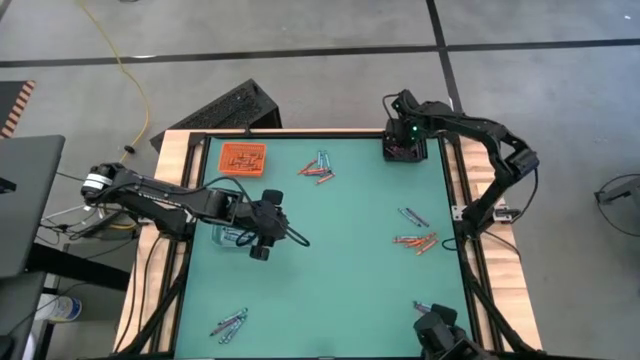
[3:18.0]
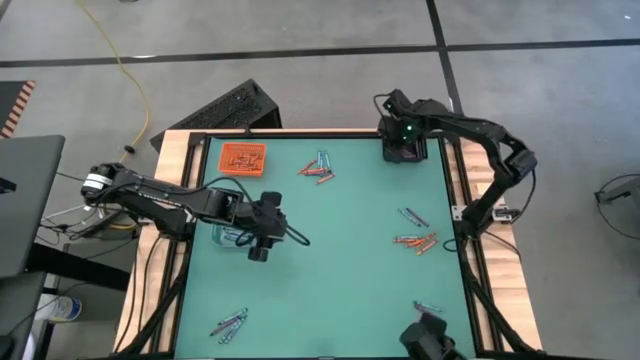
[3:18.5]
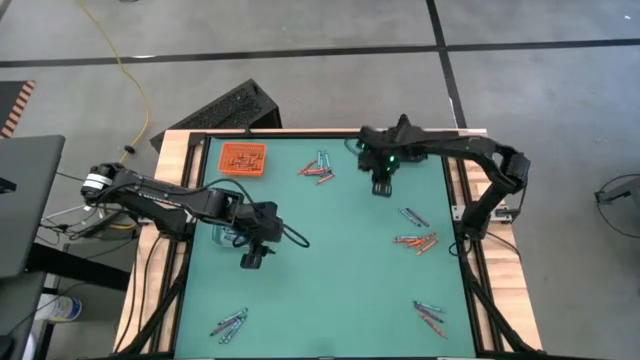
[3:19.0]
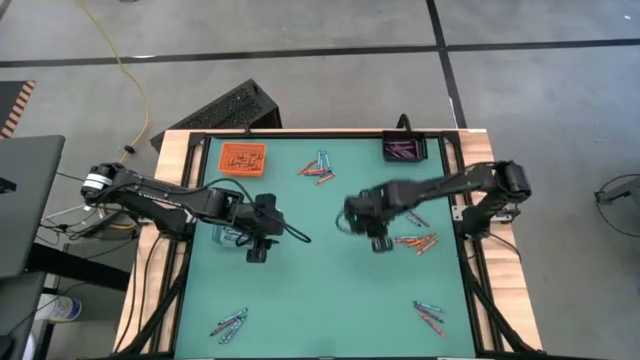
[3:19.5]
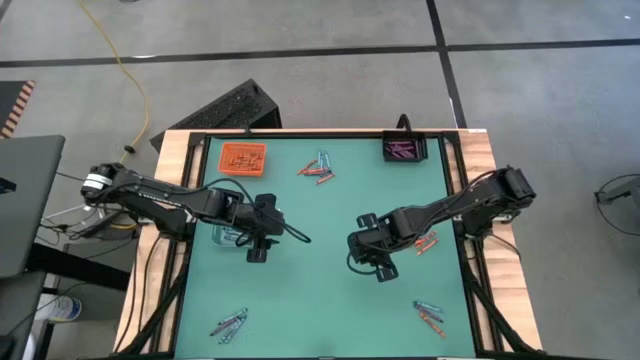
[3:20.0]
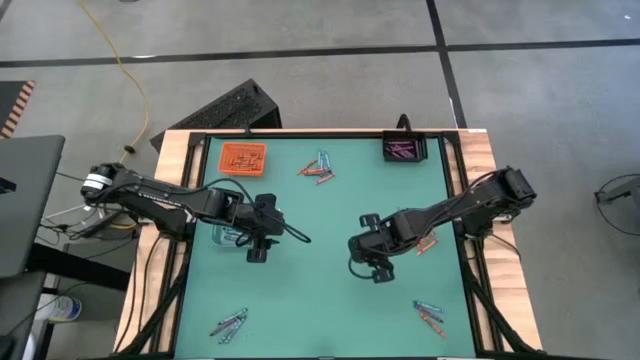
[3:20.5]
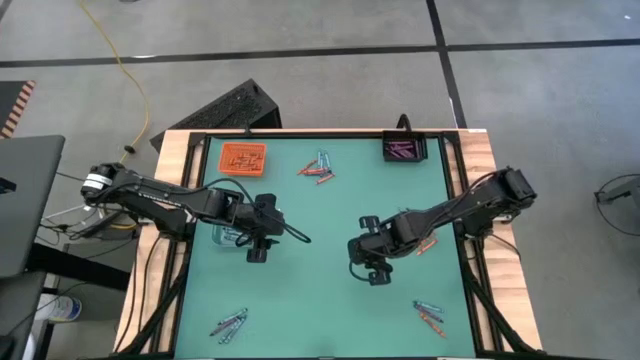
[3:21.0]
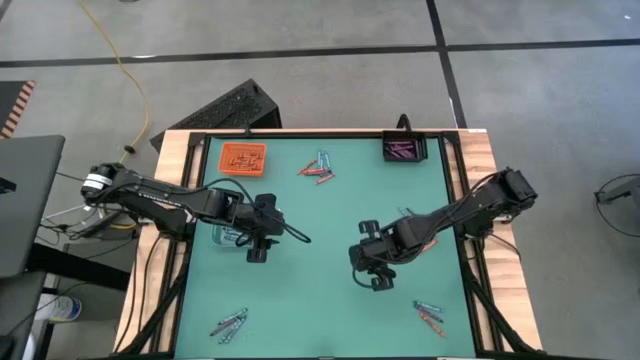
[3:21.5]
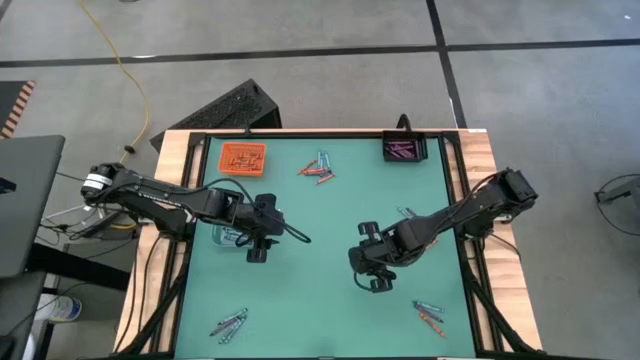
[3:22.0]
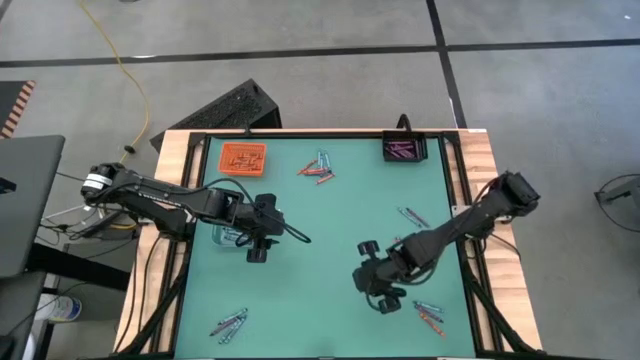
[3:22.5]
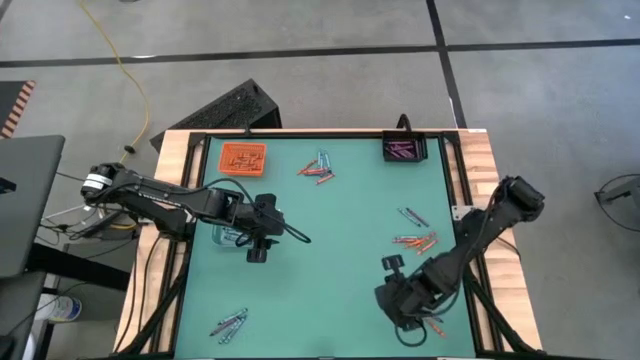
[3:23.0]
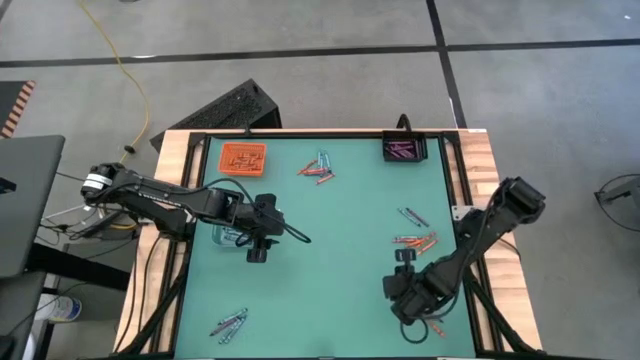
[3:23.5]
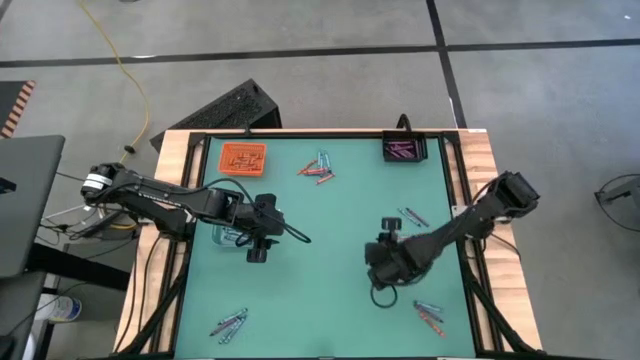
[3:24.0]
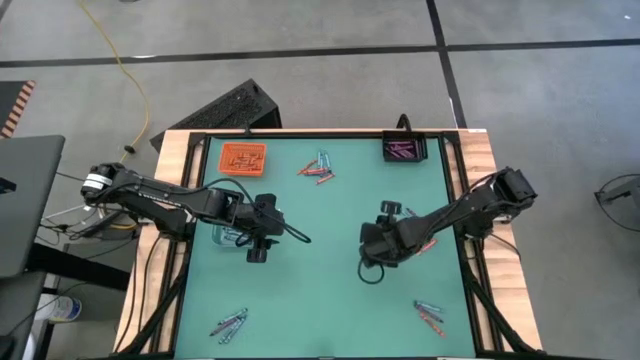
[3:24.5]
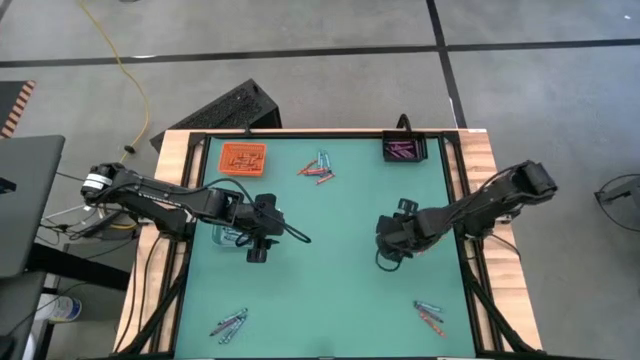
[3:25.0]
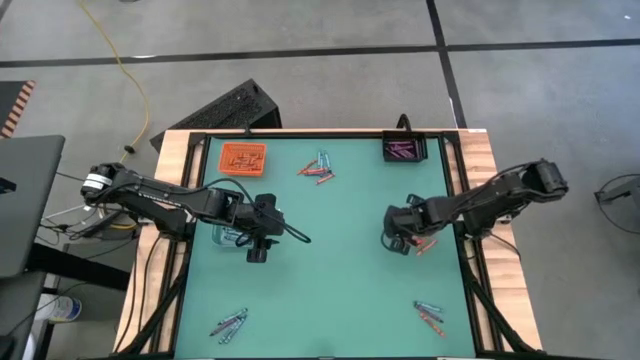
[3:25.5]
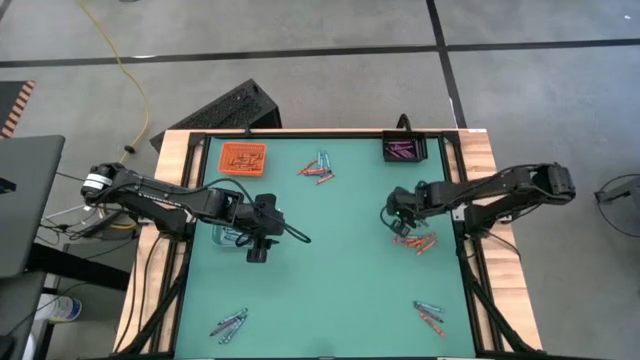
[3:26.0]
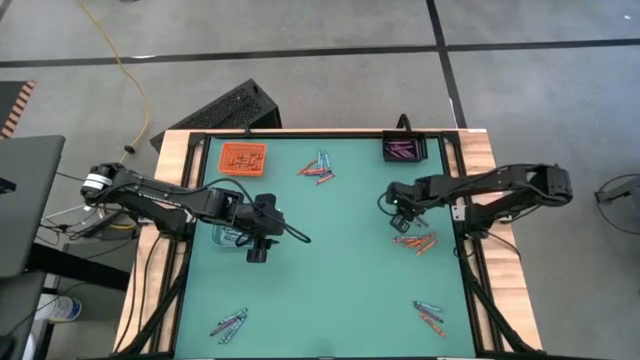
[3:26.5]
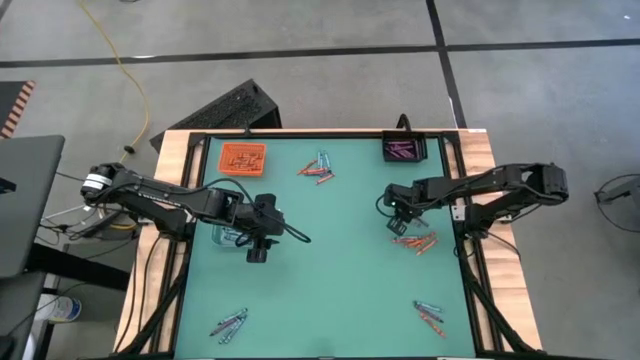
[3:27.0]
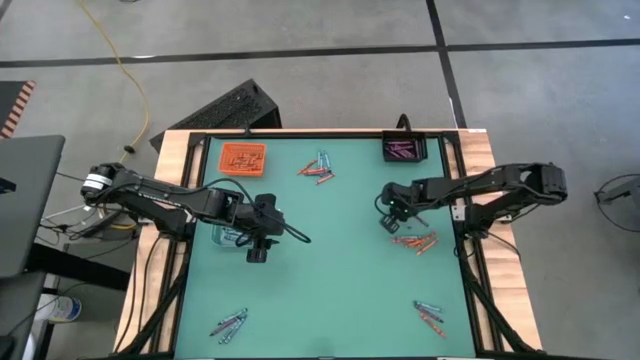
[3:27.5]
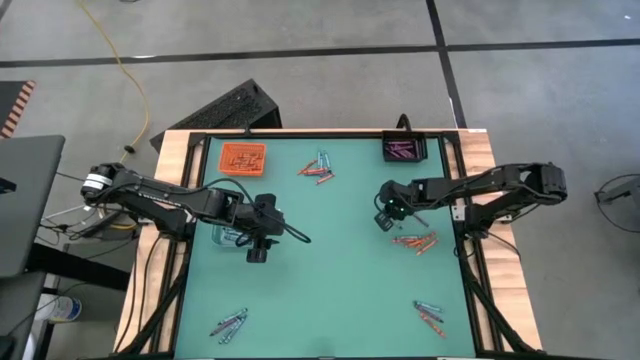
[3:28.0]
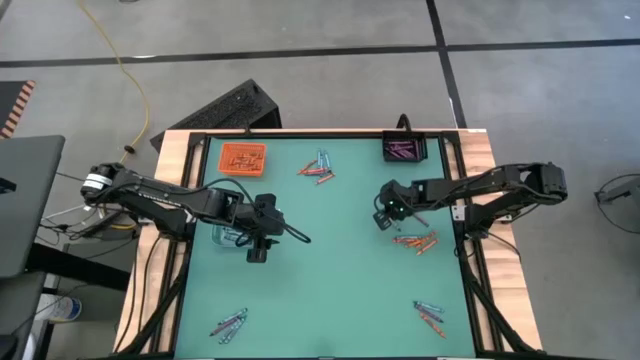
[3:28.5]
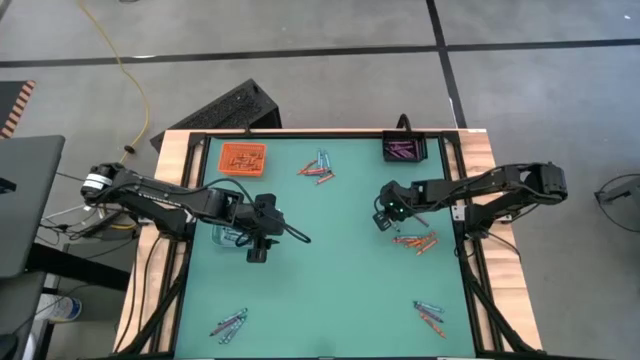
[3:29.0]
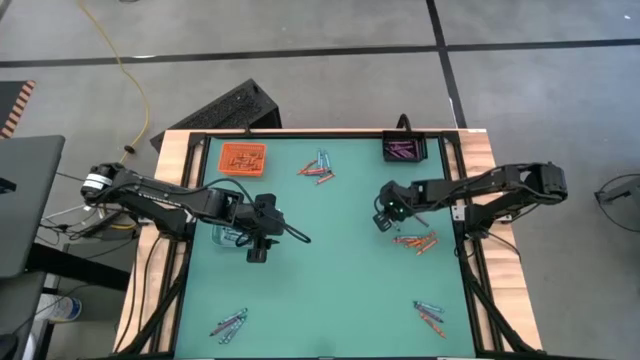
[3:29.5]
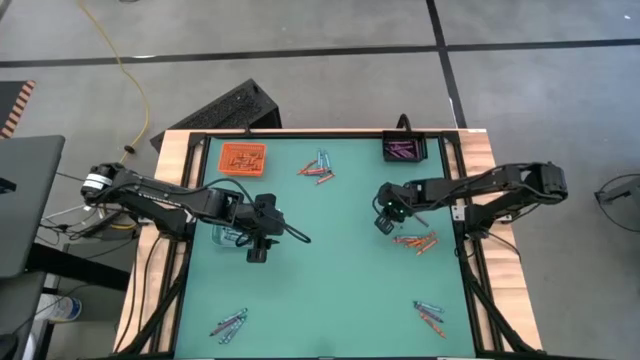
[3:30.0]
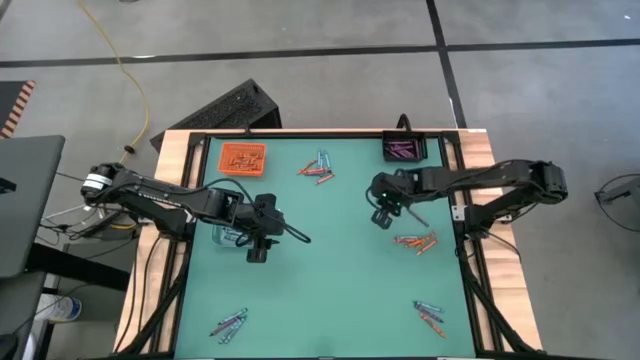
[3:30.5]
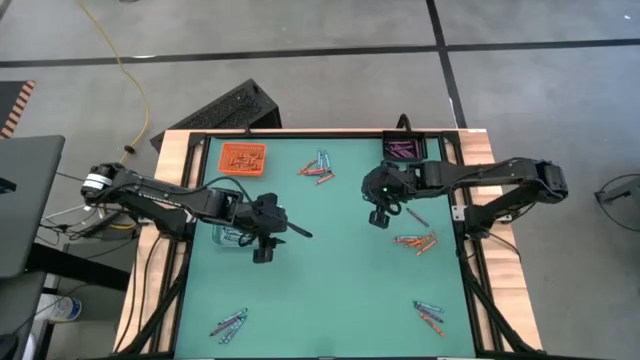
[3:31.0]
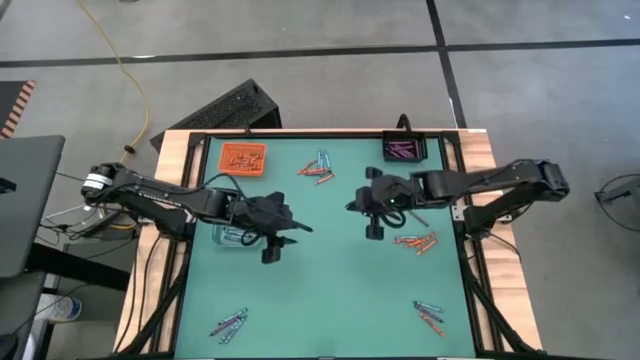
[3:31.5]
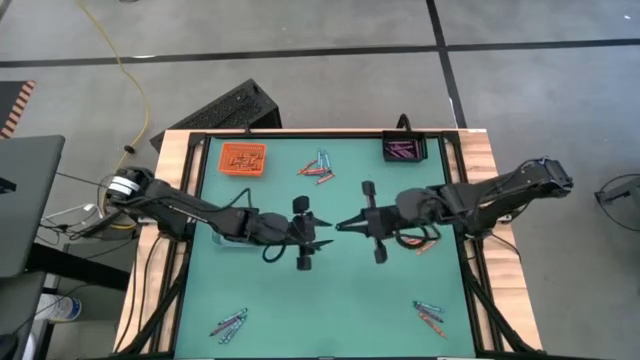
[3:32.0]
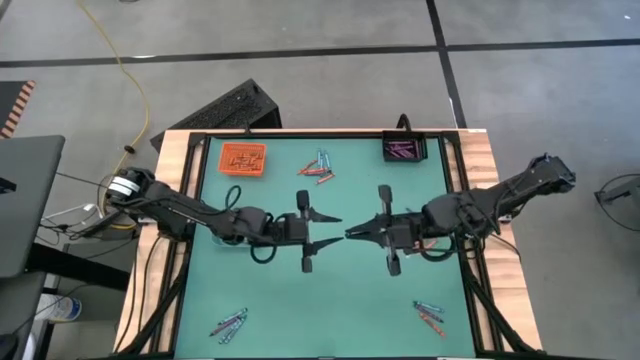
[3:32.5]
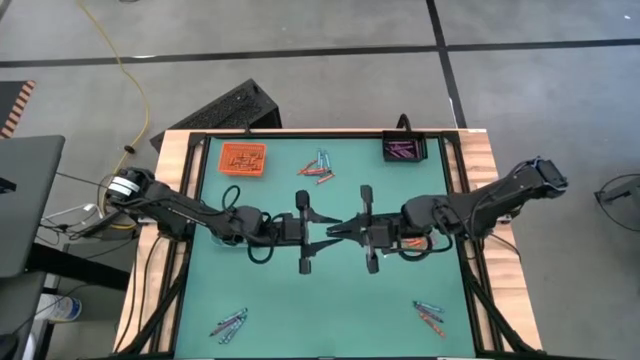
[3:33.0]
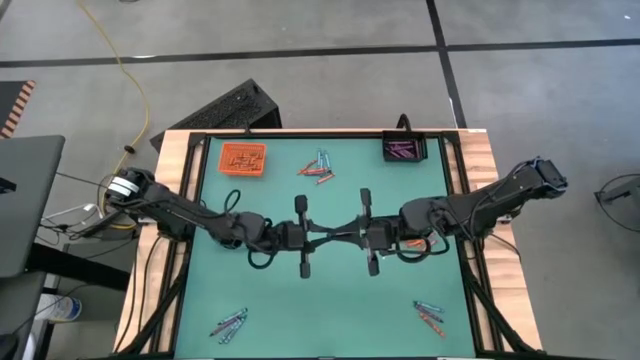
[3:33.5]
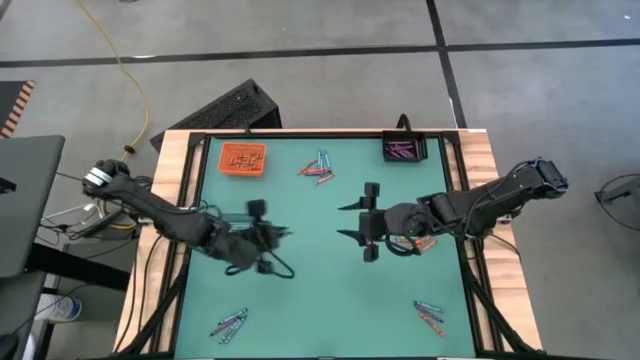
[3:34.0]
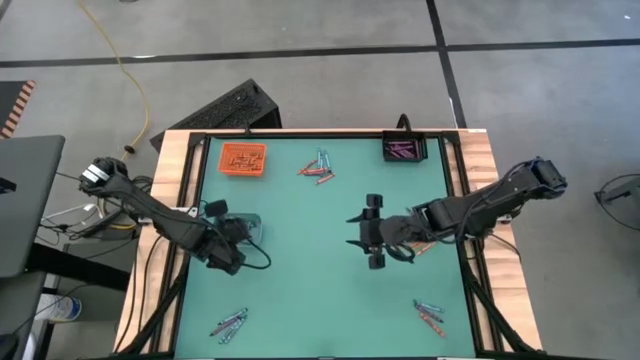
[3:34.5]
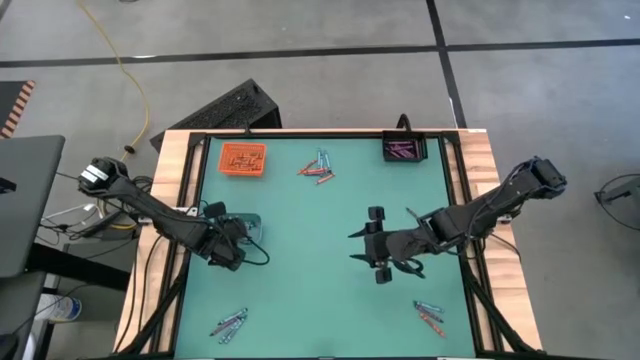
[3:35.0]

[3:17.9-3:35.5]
Task: Sort crayons
Put the middle right blue crayon into the left blue bin

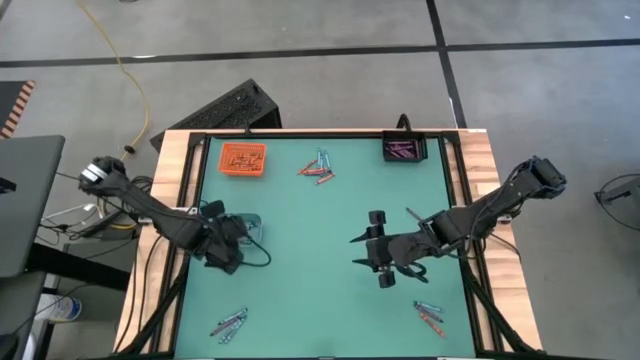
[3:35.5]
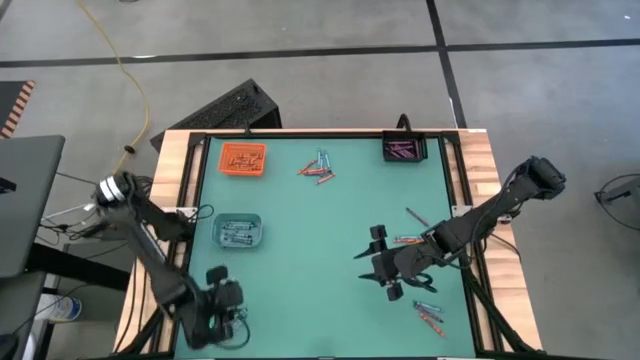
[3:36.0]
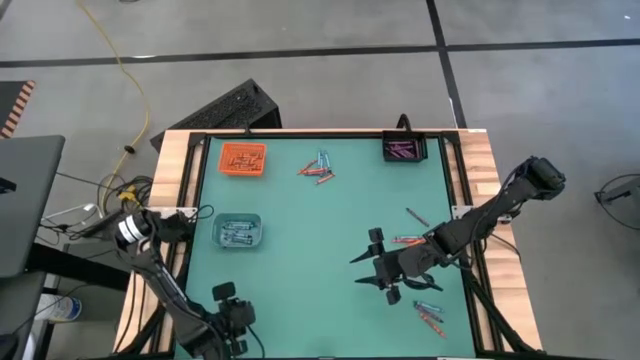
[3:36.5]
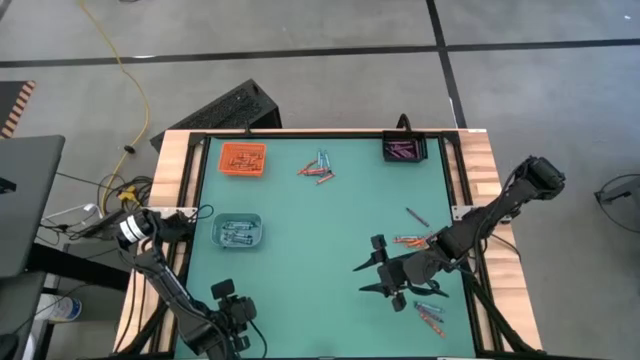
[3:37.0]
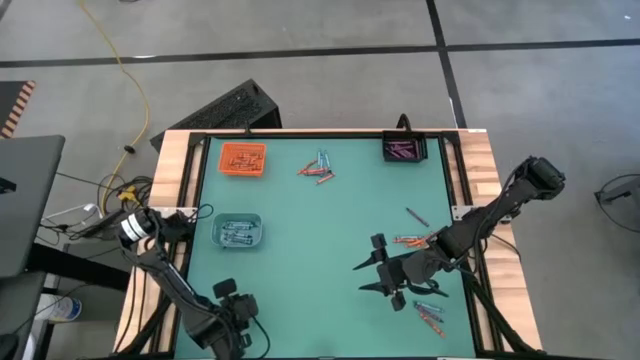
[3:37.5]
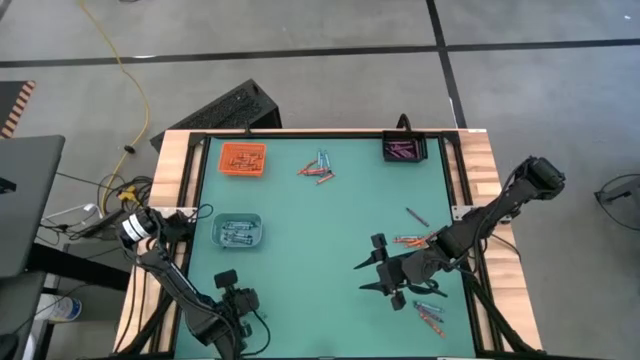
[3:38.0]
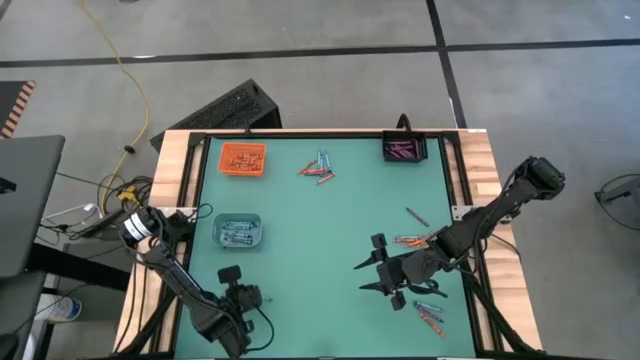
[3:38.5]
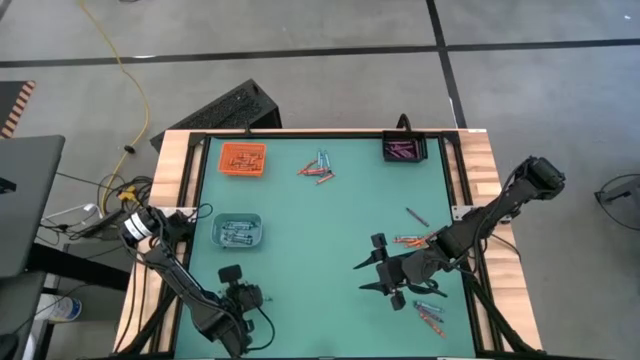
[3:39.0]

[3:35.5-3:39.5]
Put the bottom left blue crayon into the left blue bin

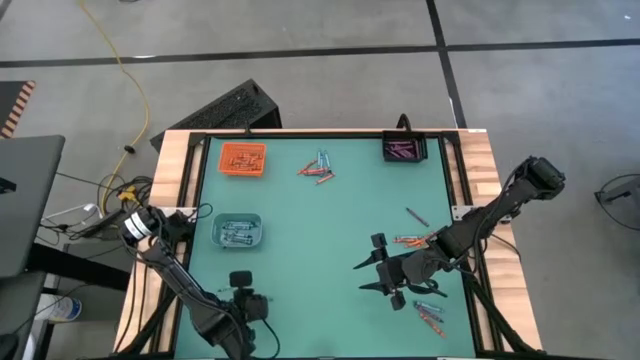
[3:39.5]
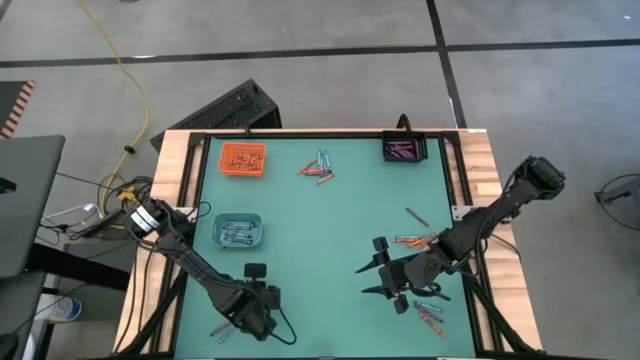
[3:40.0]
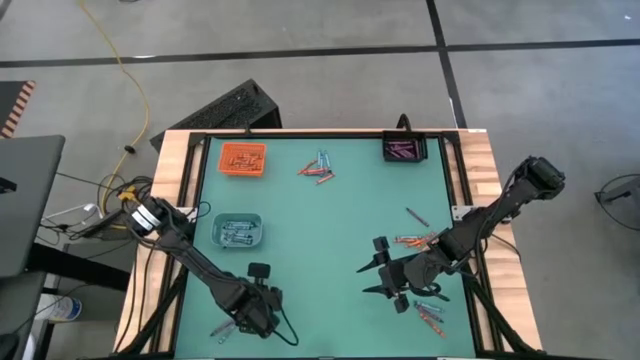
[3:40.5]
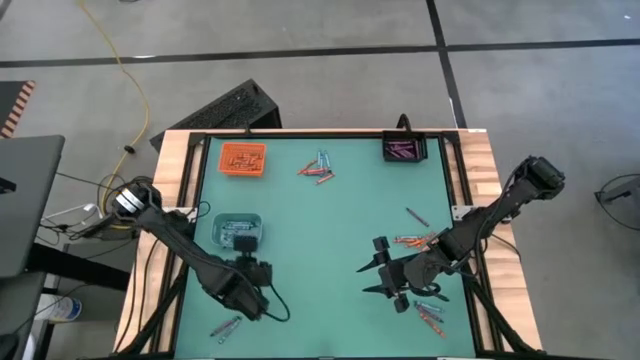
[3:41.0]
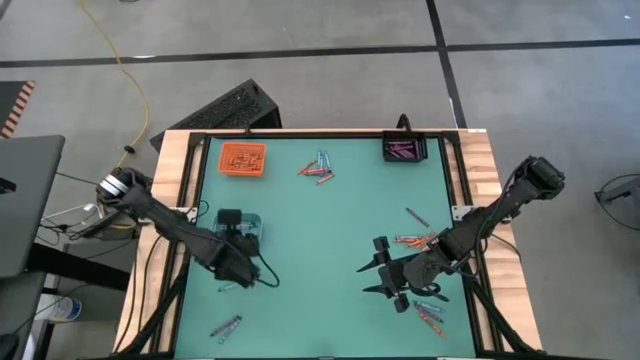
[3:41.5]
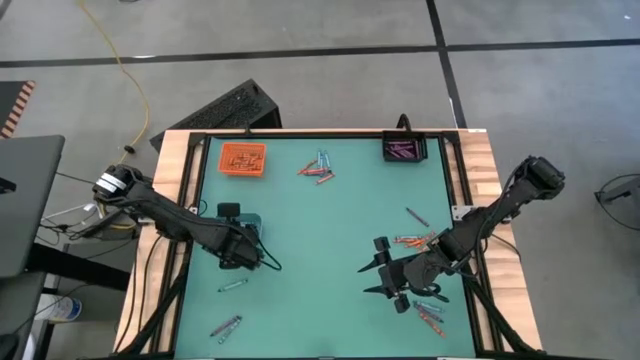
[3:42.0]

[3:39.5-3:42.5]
Put the bottom left blue crayon into the left blue bin
